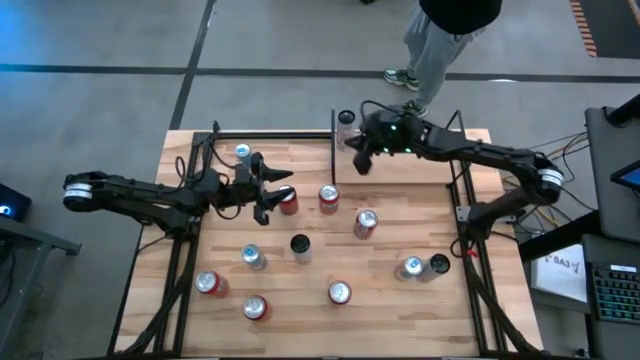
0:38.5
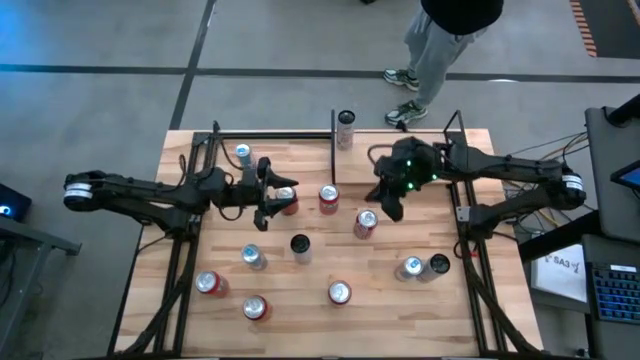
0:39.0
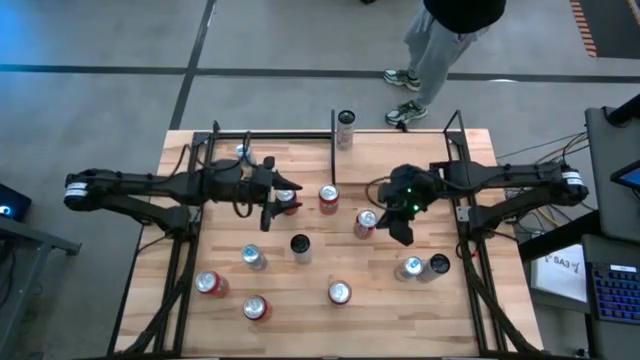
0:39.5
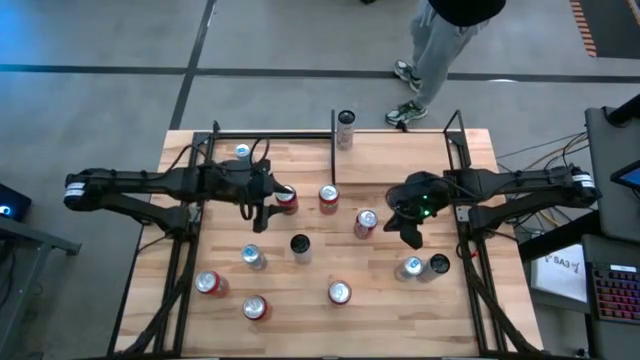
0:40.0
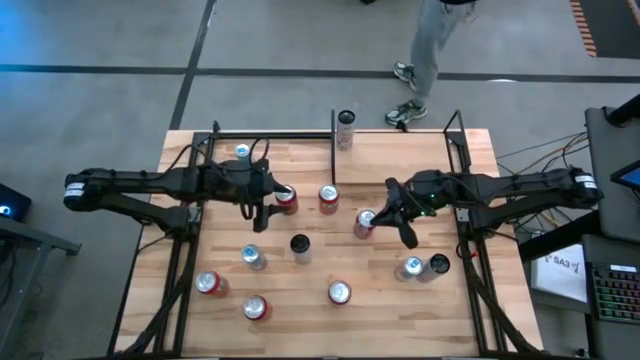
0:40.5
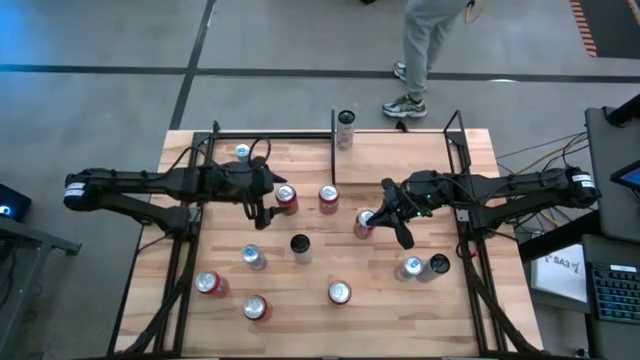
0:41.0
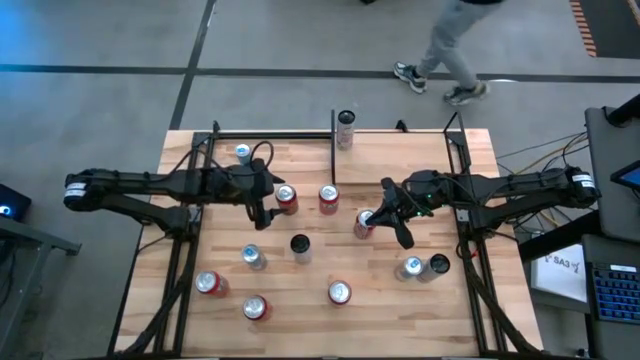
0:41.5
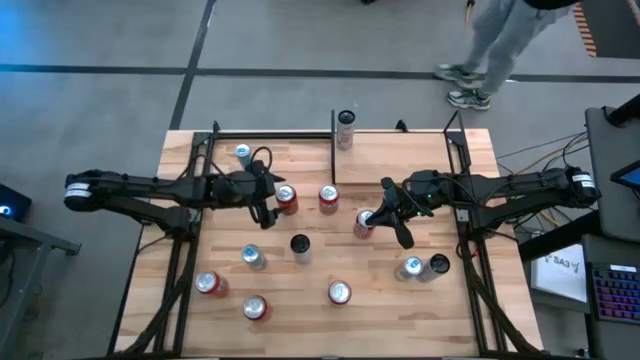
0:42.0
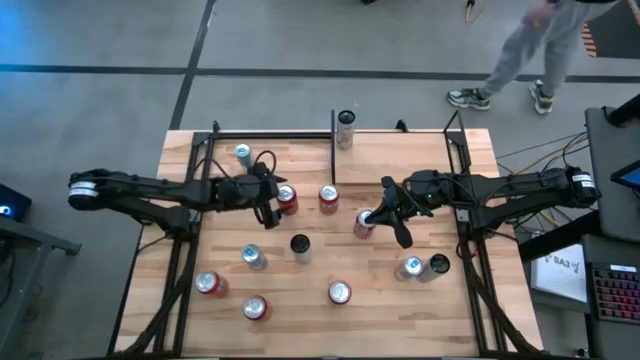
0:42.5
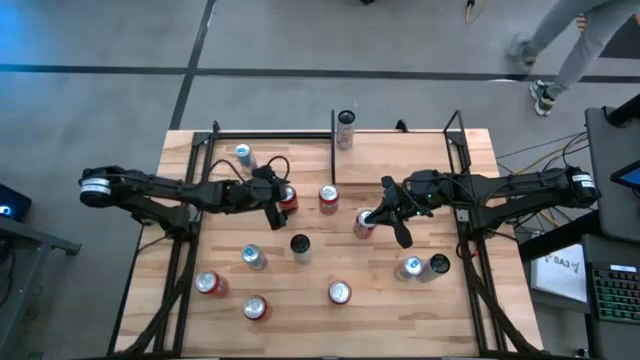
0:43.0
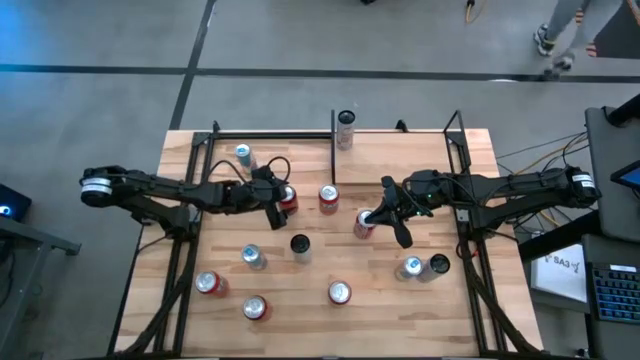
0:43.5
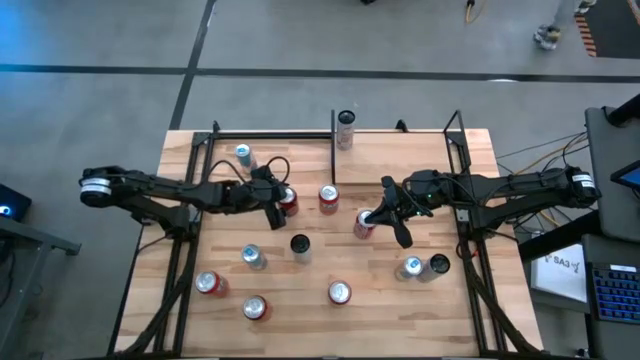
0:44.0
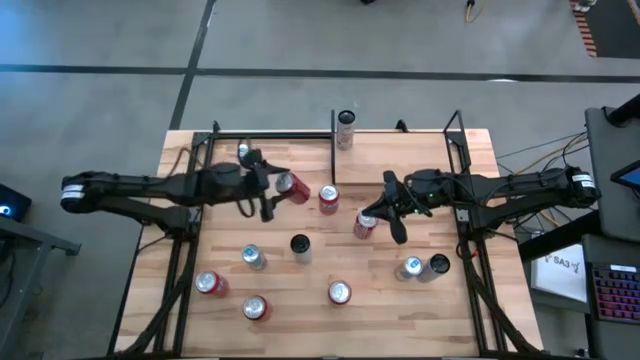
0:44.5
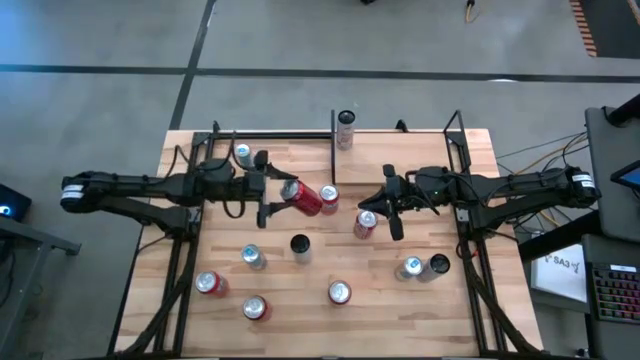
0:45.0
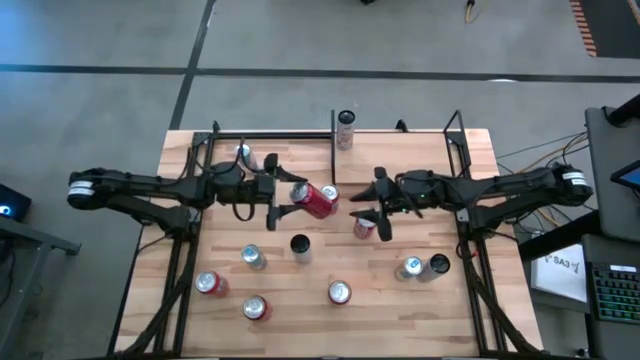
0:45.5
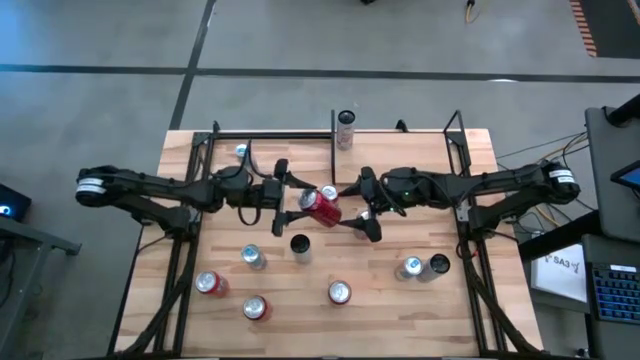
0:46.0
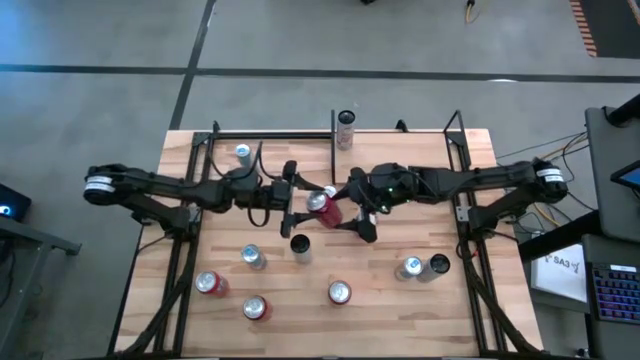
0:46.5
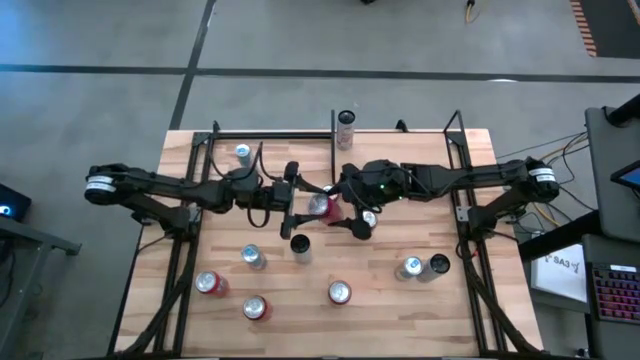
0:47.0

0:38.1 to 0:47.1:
Task: Place canned beverage on shelf
Put the top red black soda can on the shelf

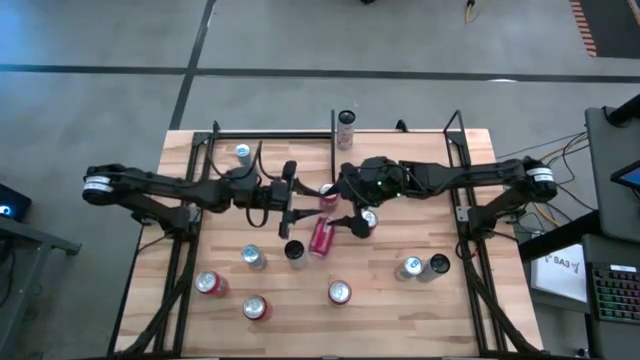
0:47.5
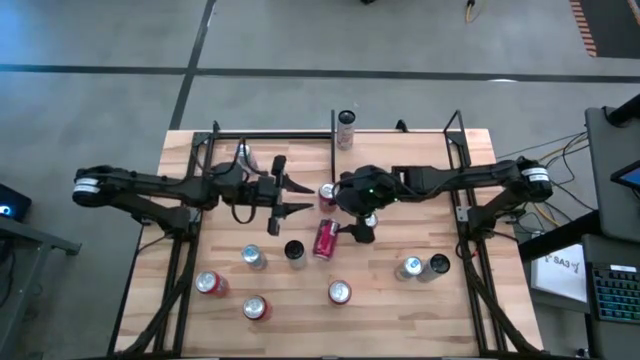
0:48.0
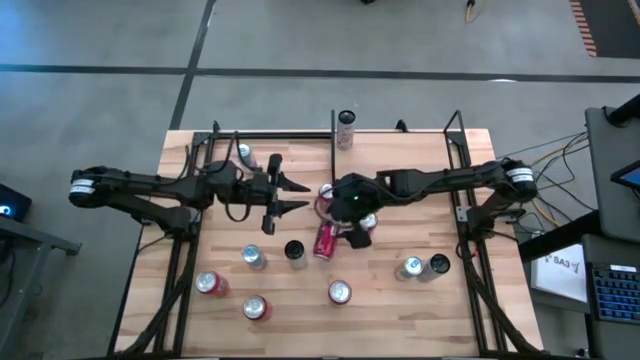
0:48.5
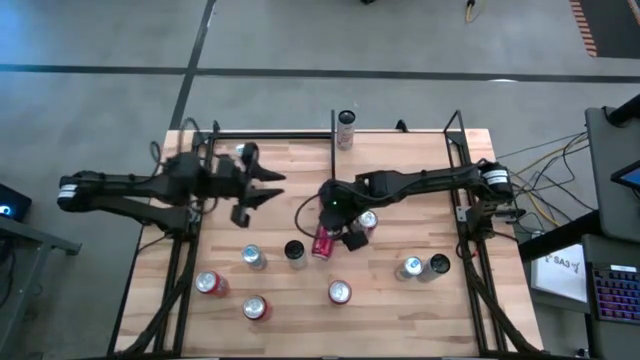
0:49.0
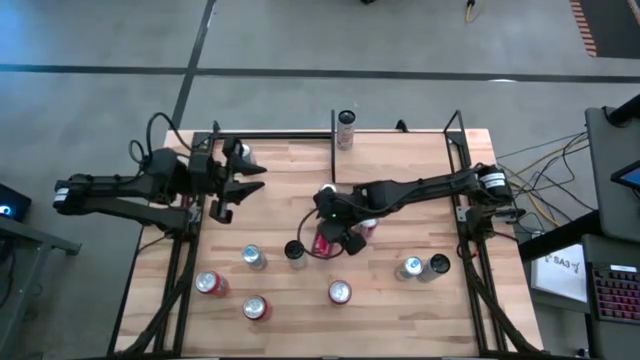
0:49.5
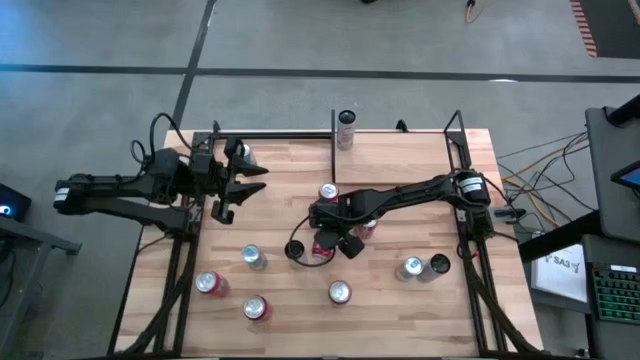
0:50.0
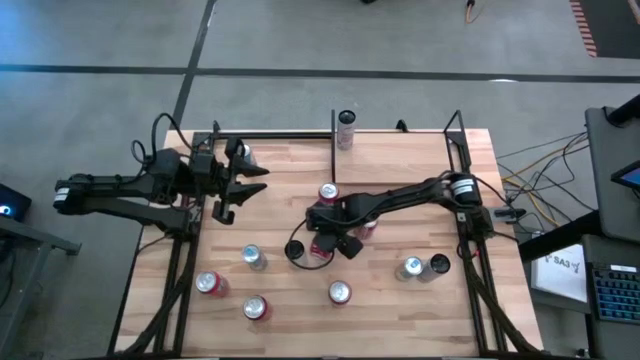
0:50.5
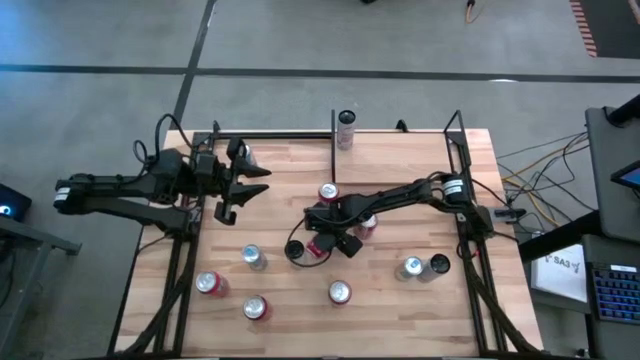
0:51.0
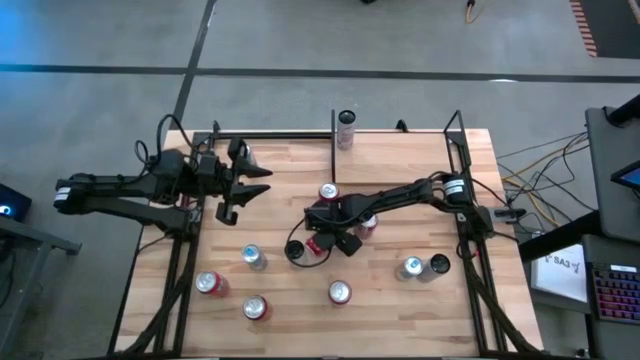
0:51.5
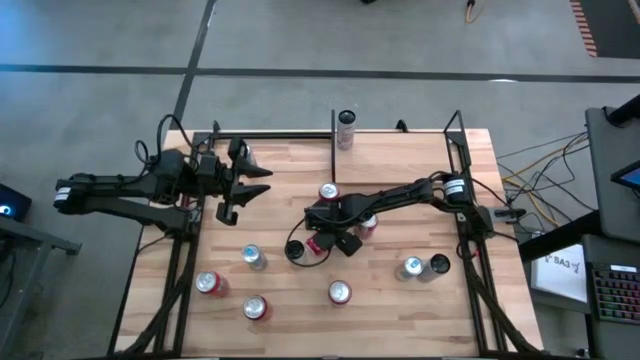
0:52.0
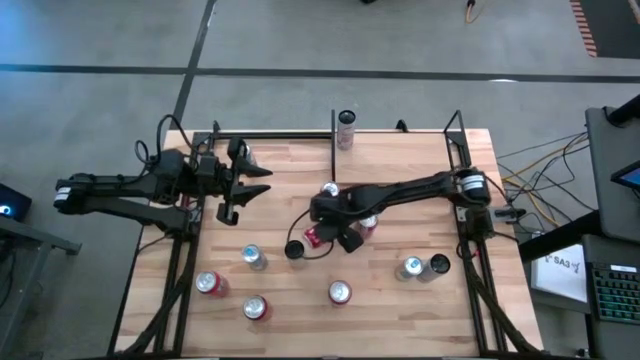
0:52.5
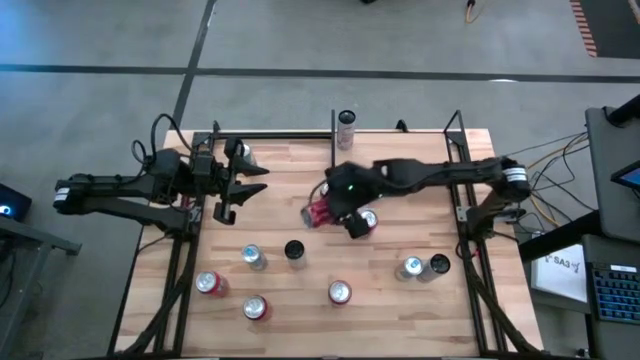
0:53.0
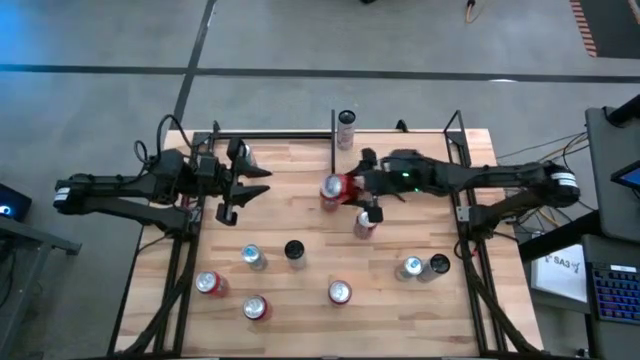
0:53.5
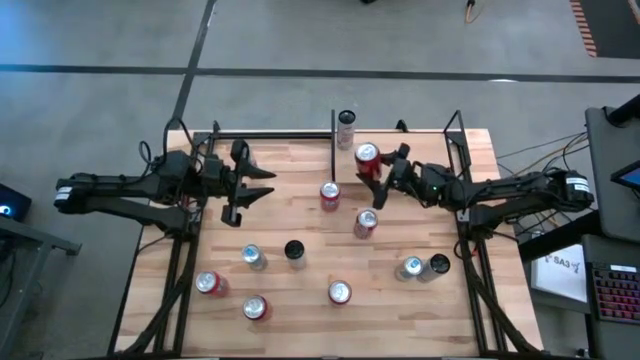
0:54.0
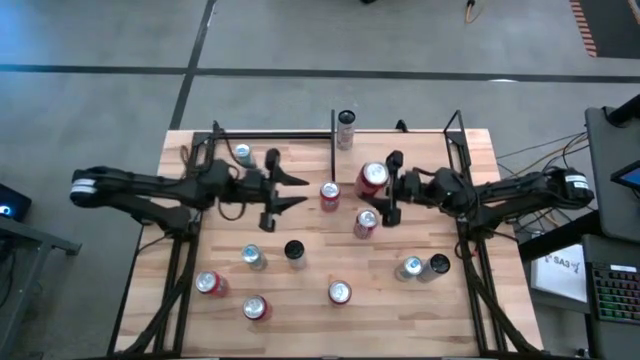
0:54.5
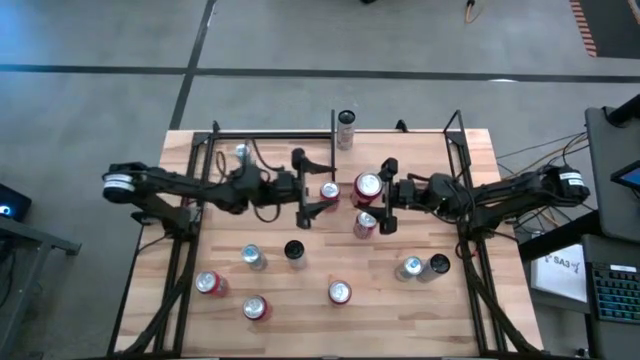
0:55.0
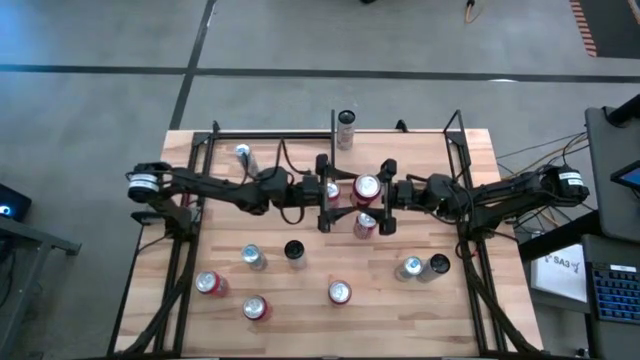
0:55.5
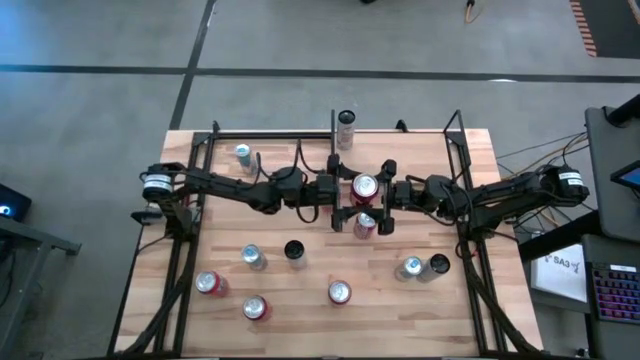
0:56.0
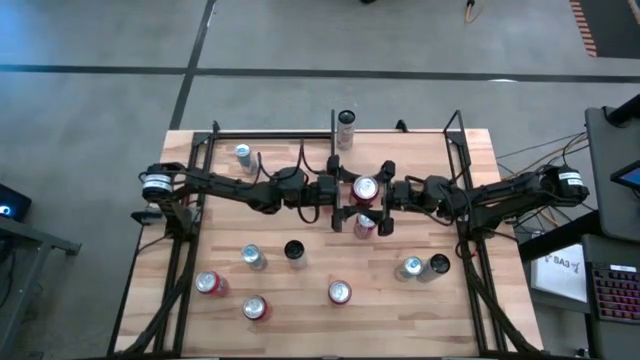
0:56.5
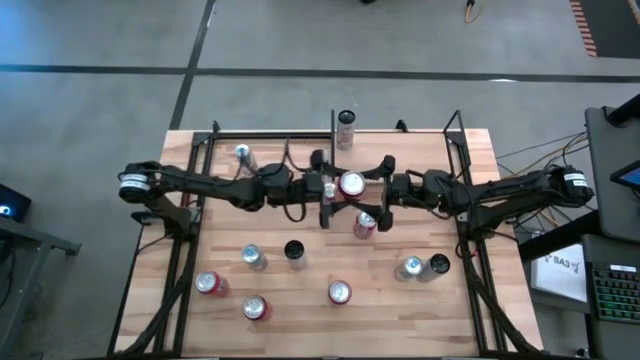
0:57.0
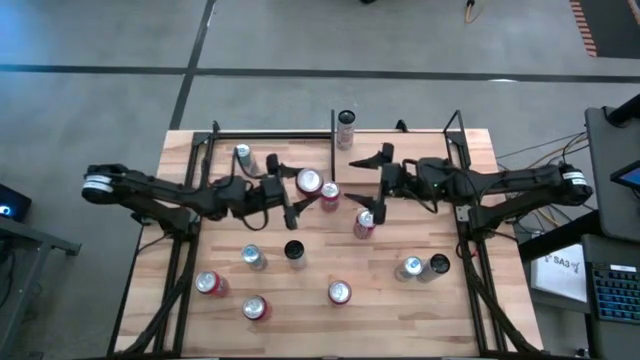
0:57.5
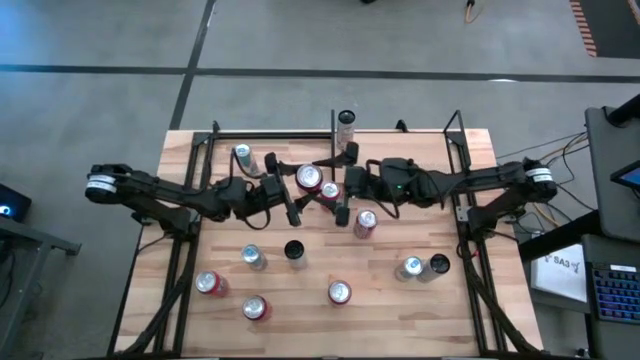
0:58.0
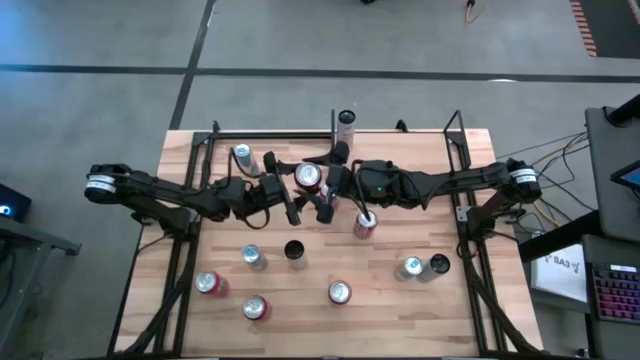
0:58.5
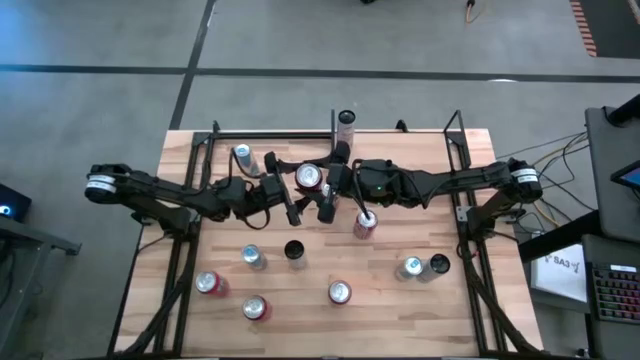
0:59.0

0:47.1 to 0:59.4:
Put the top red black soda can on the shelf
